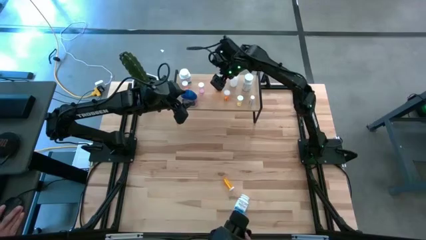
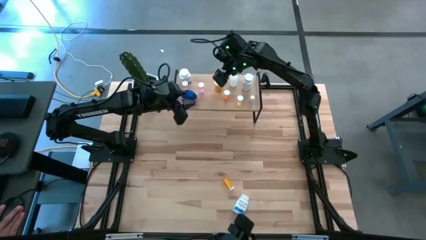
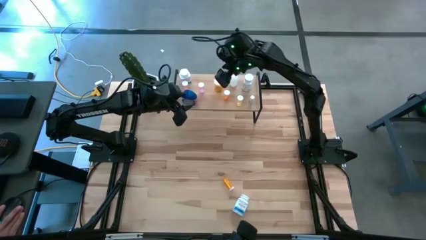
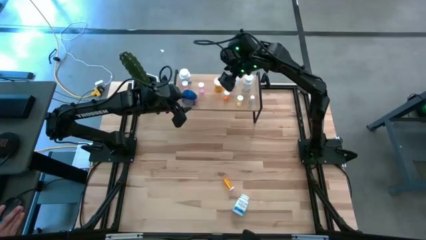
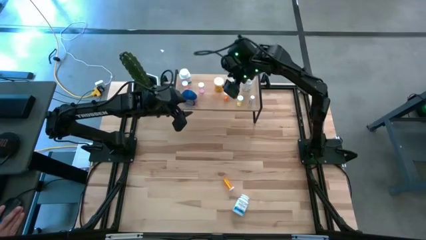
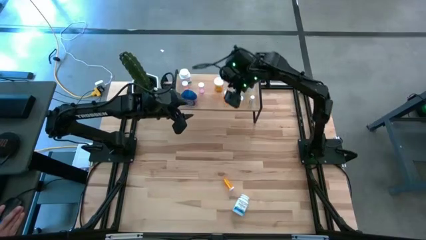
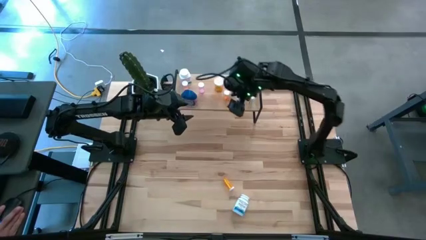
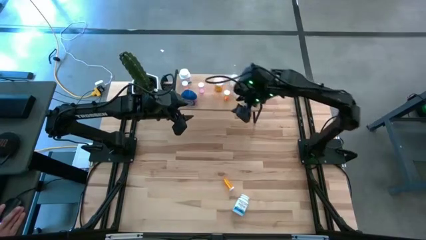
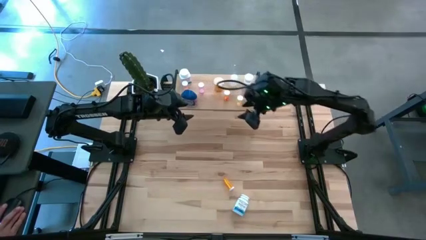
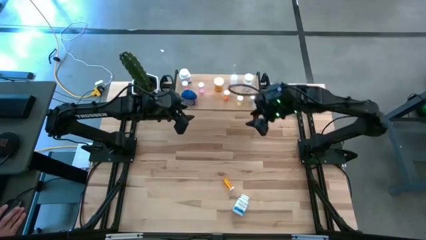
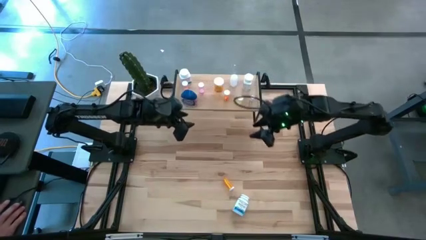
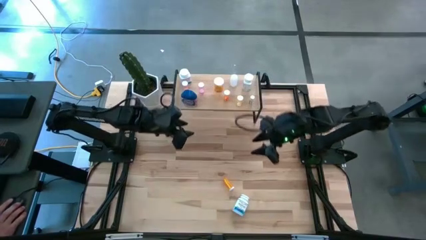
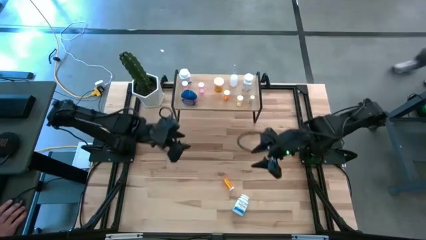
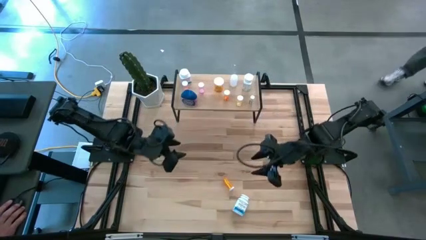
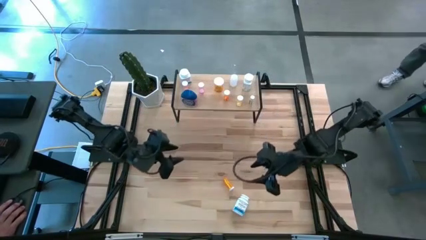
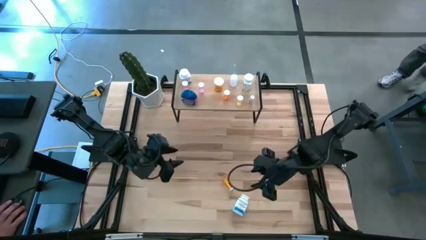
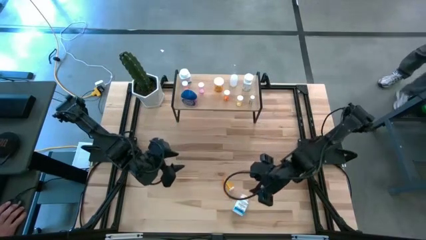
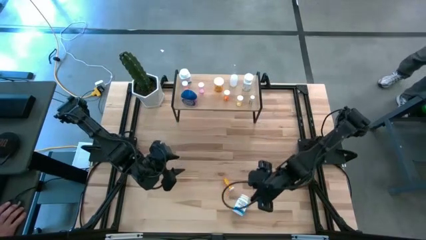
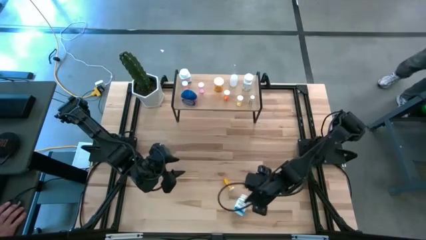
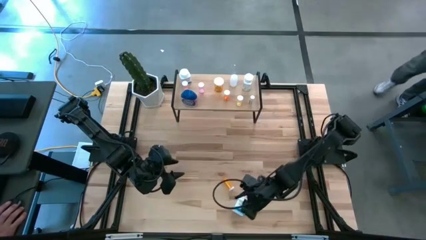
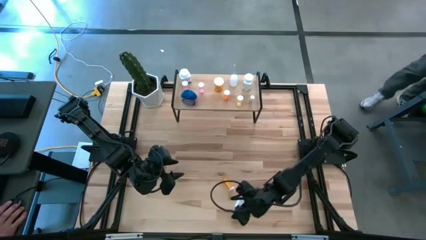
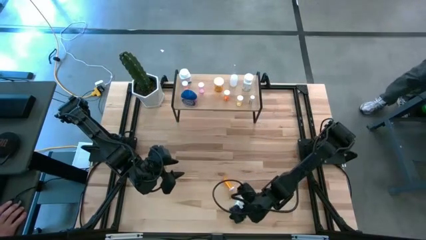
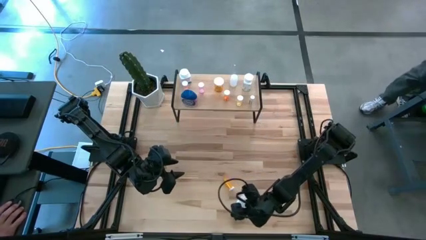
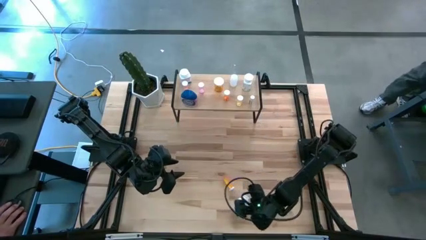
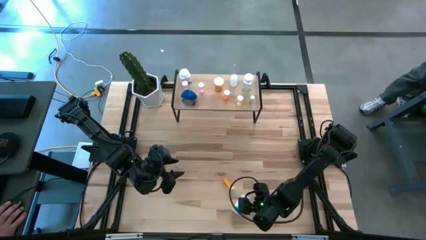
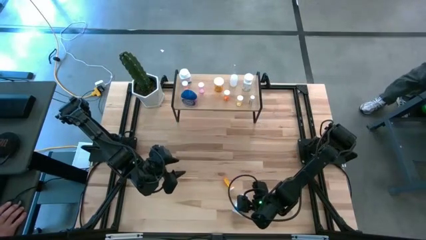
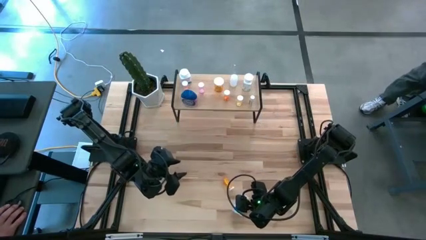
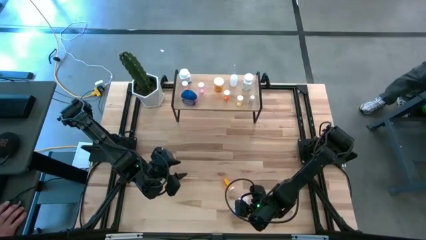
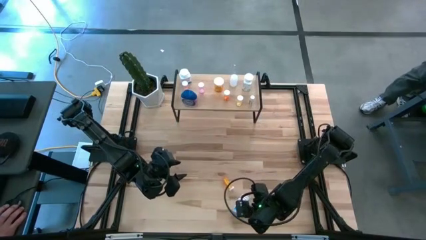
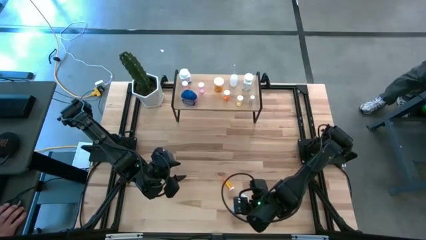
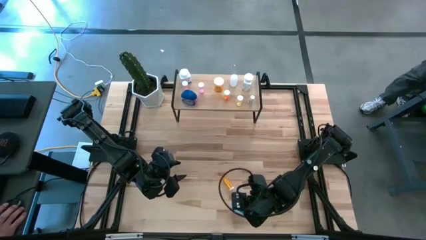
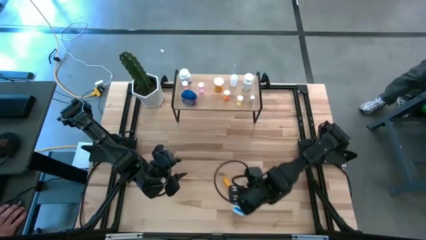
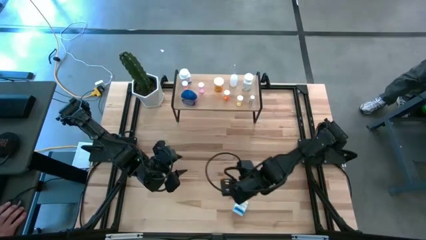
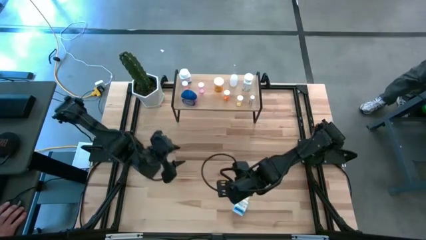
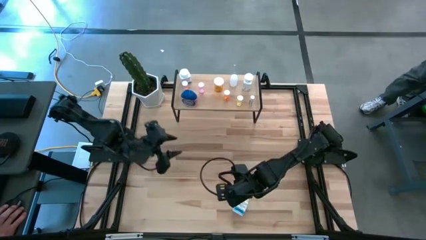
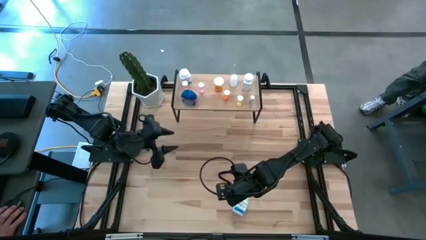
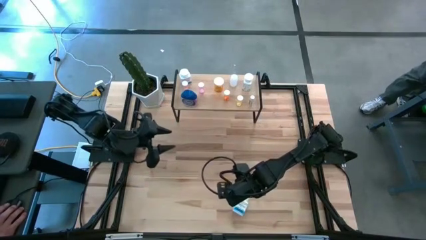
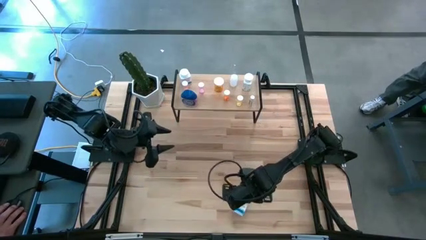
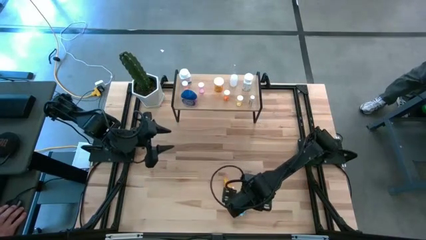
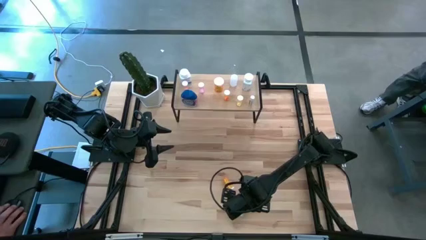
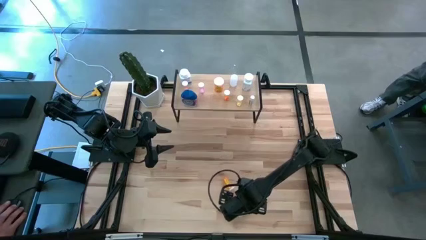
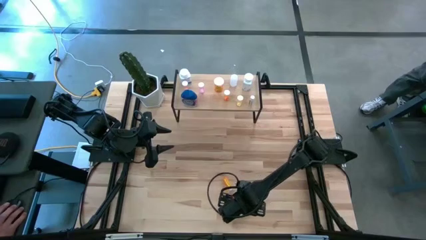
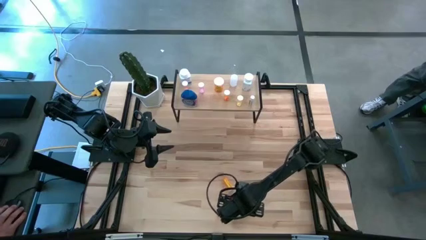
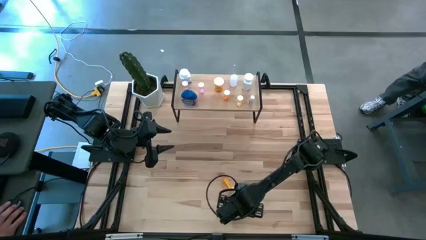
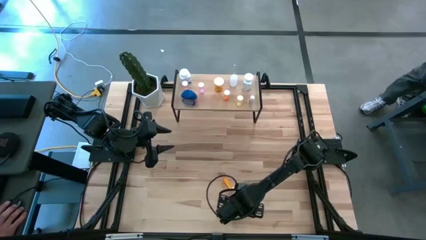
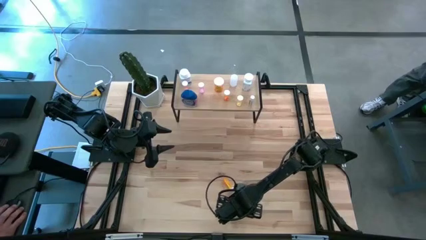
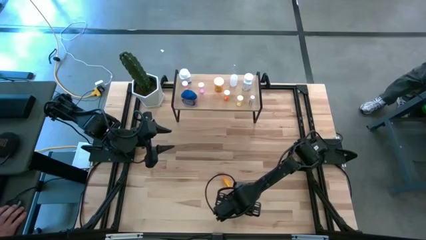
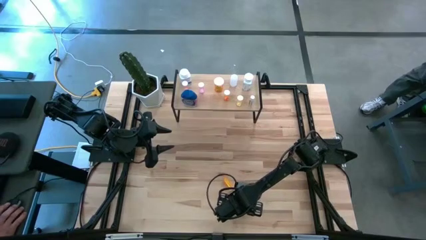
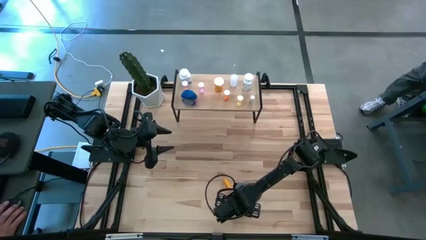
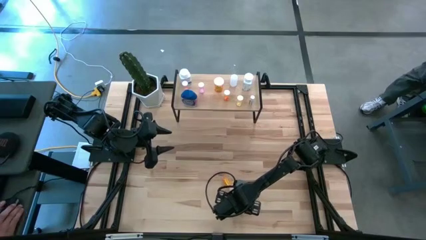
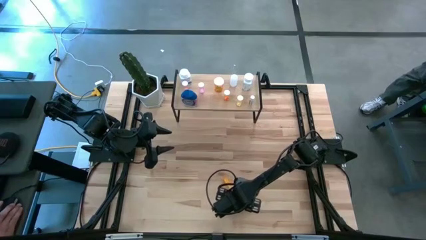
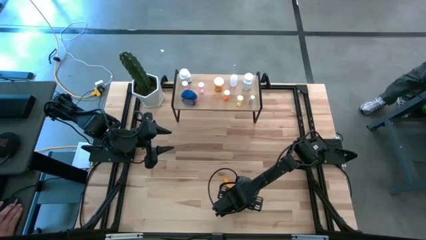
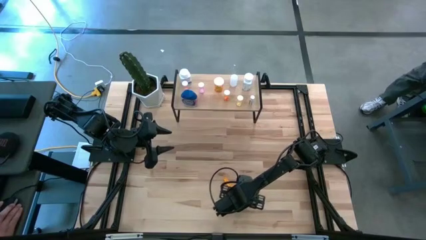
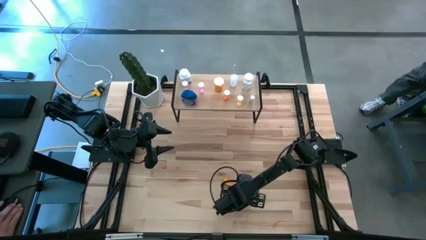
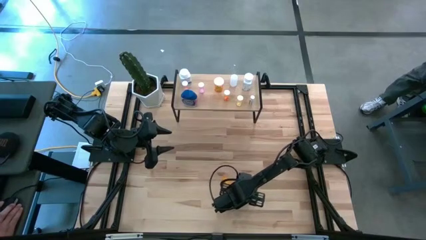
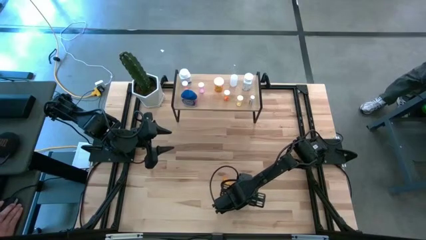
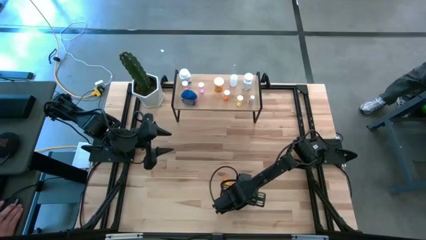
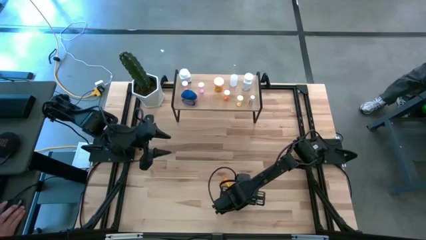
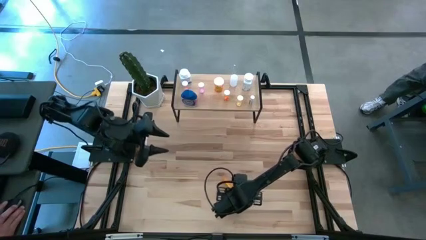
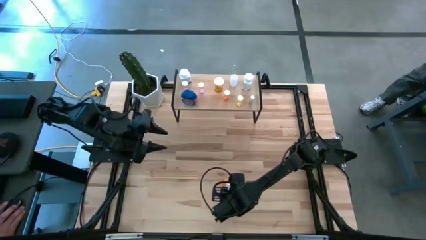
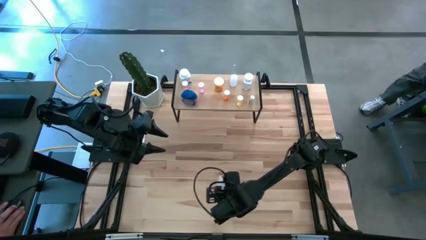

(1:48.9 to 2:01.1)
Task: Pick and place medicine bottles onto shelf by color
Put the white large pill bottle on the shelf

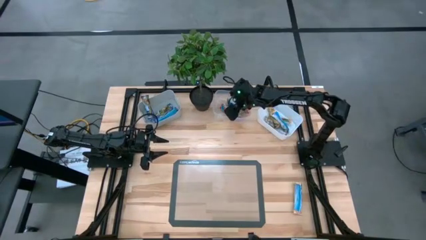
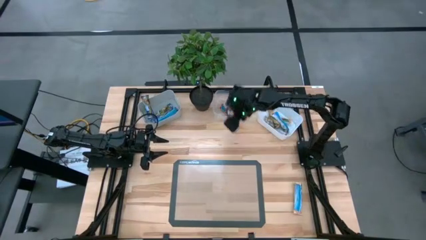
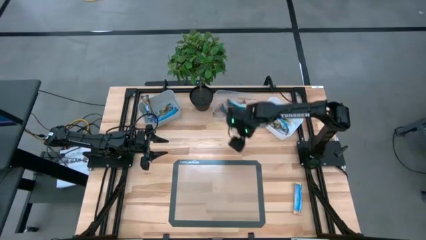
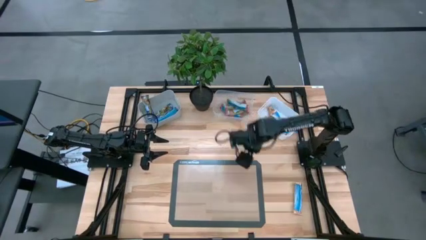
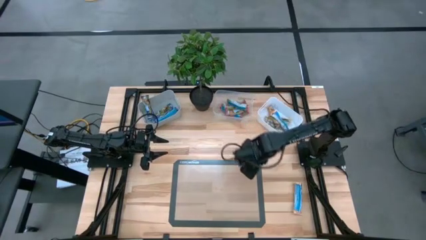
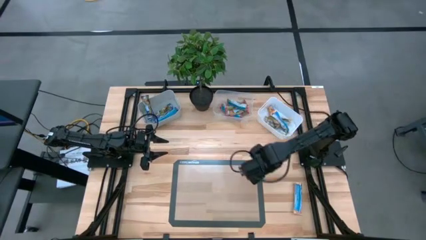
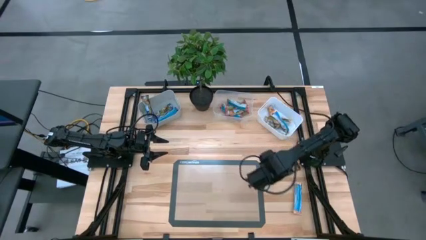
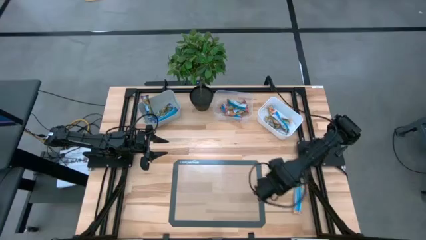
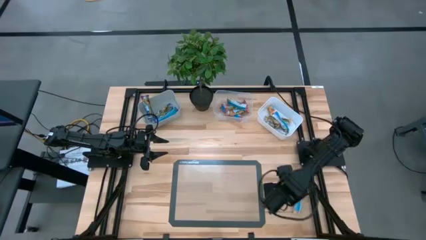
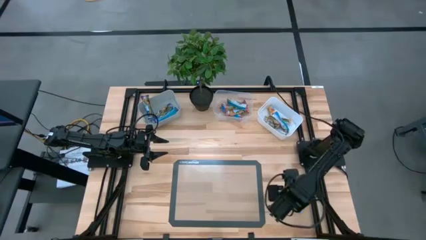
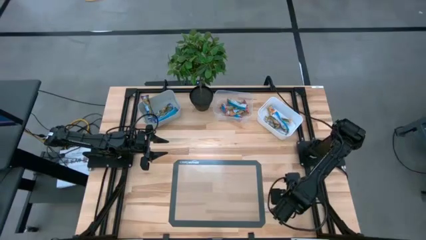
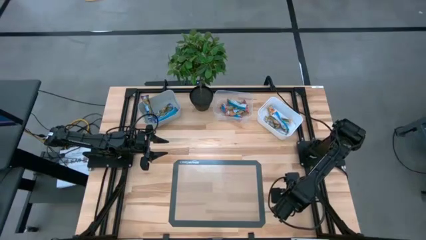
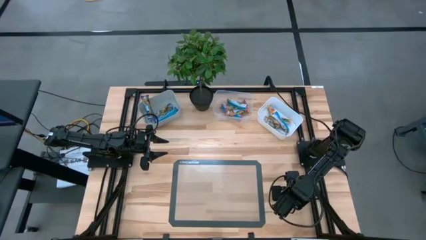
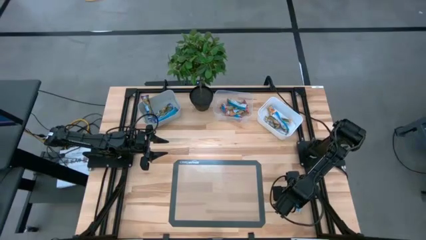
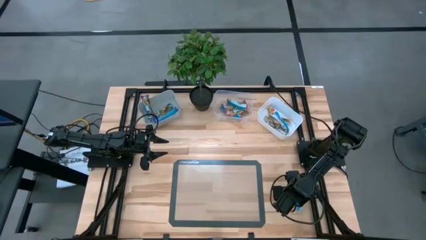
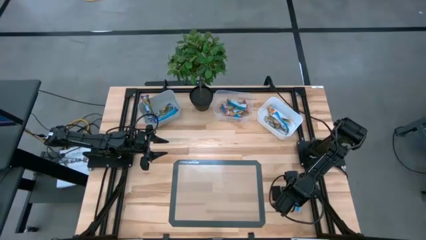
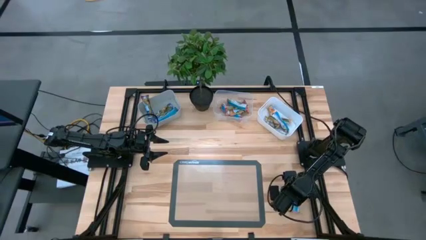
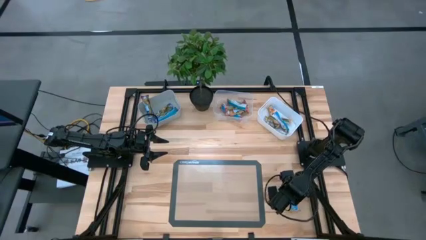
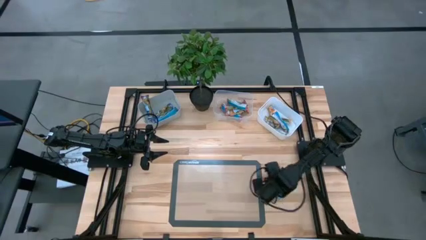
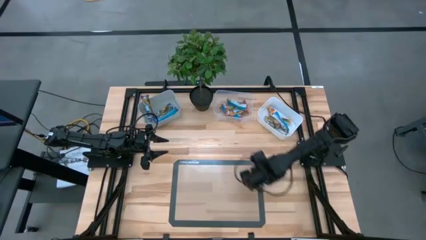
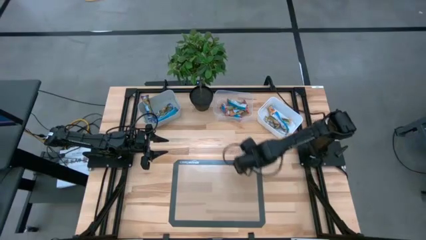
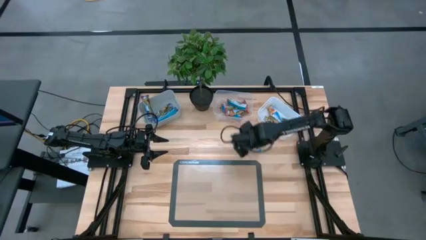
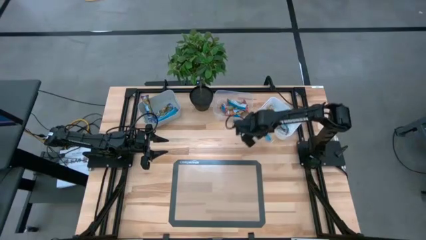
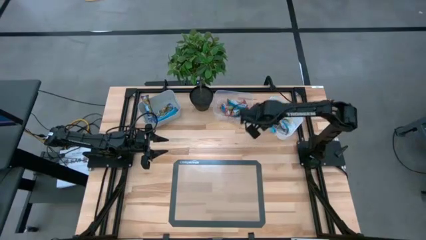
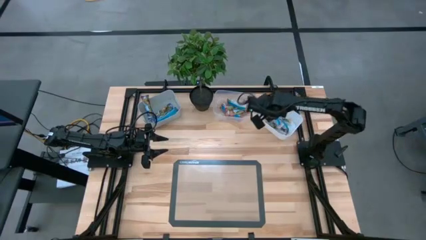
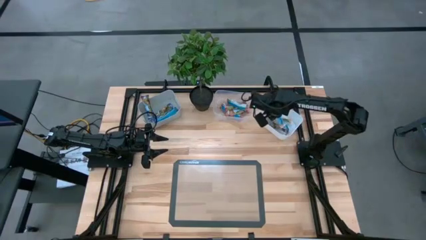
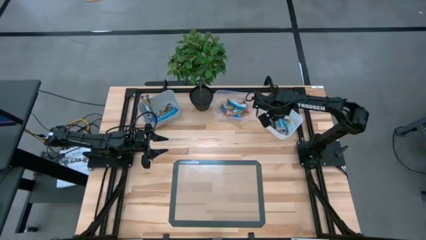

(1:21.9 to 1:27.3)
Task: Pick and place Granola Bars by type
Put the yellow granola bar into the white bin
